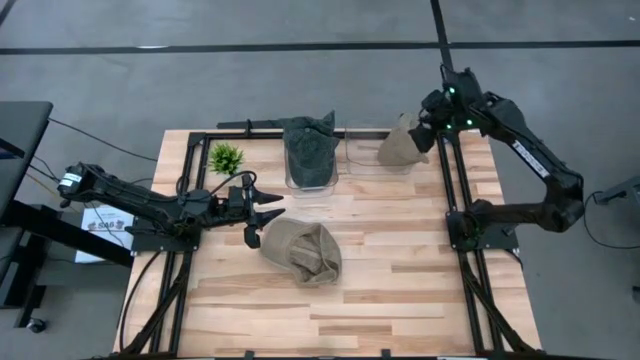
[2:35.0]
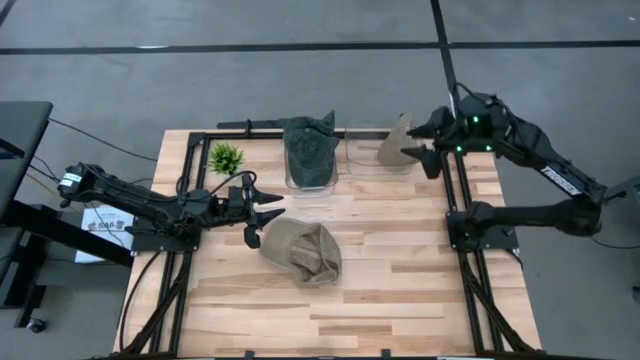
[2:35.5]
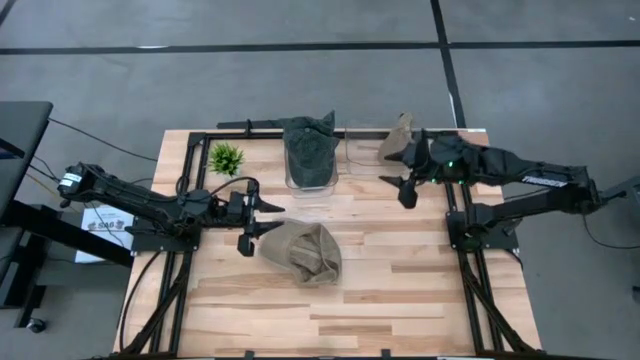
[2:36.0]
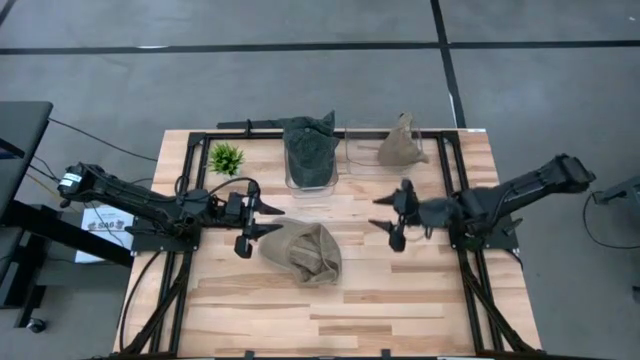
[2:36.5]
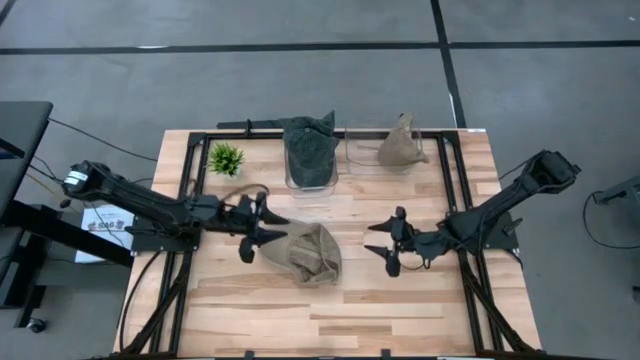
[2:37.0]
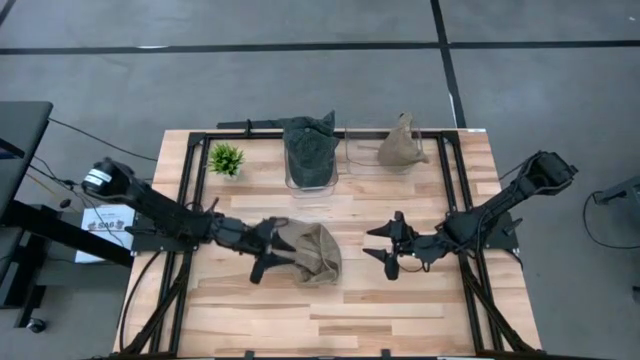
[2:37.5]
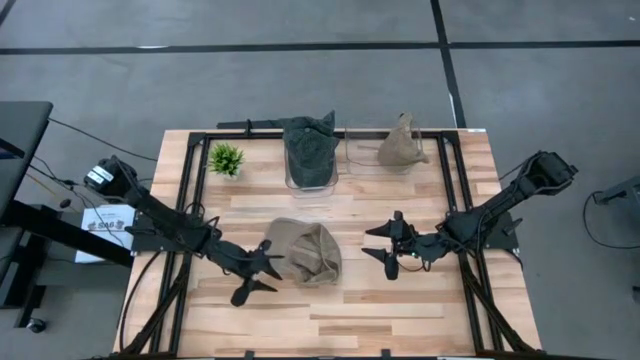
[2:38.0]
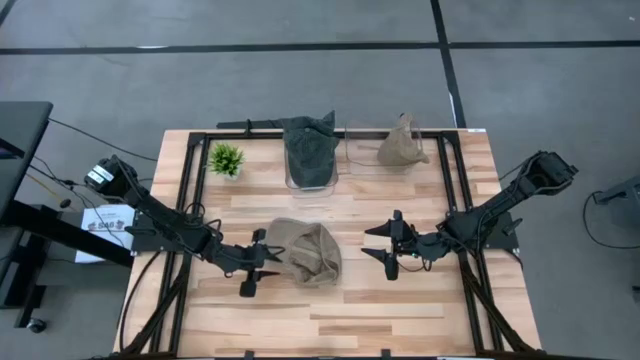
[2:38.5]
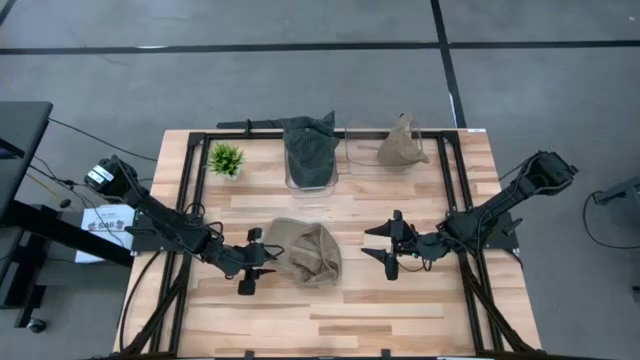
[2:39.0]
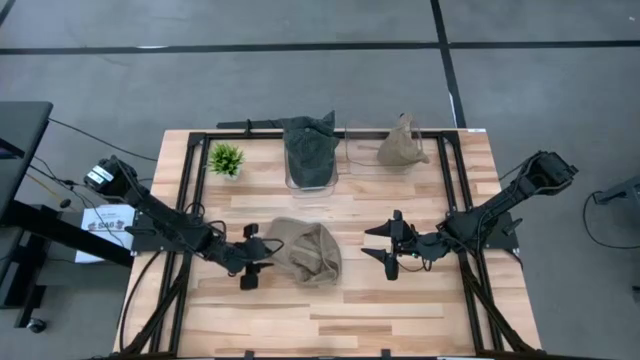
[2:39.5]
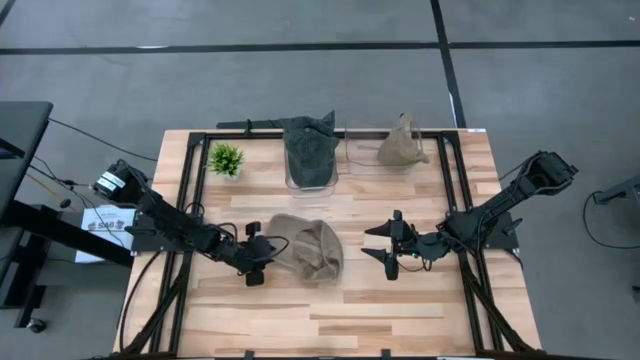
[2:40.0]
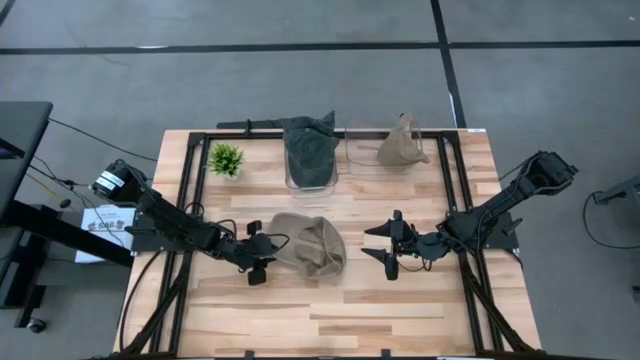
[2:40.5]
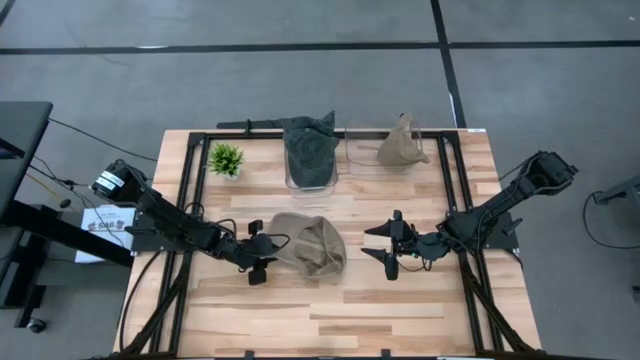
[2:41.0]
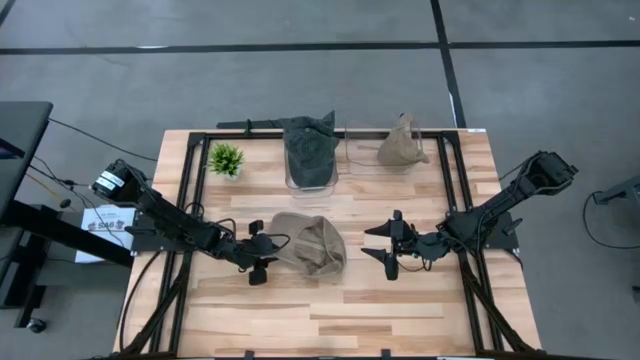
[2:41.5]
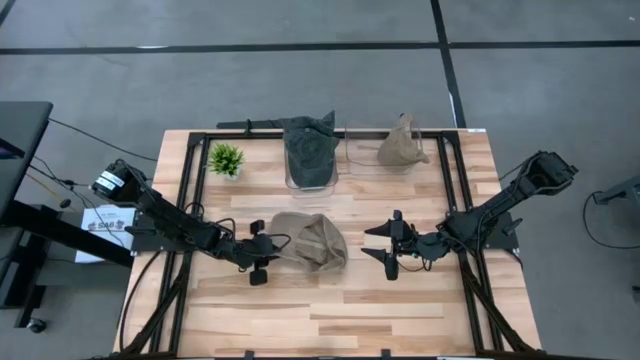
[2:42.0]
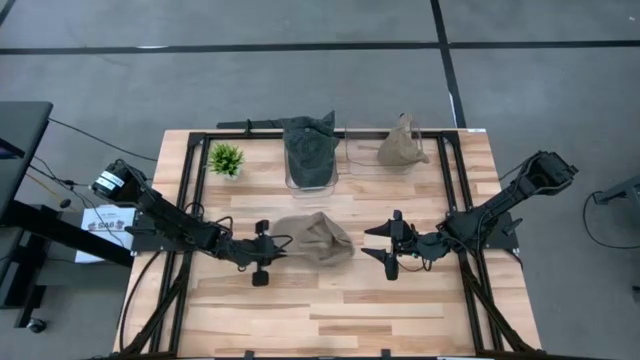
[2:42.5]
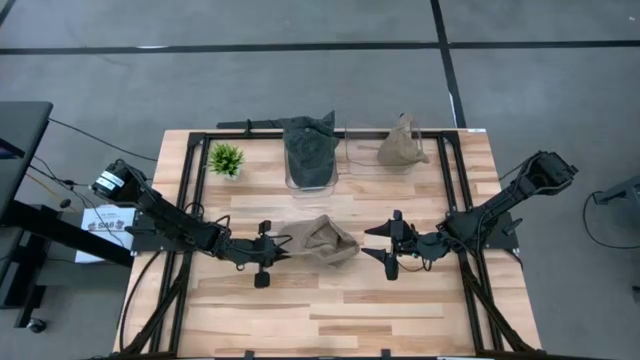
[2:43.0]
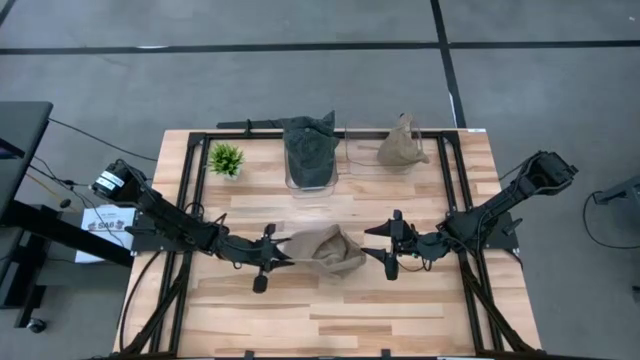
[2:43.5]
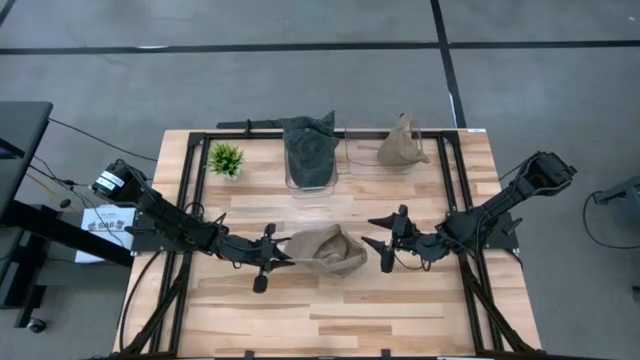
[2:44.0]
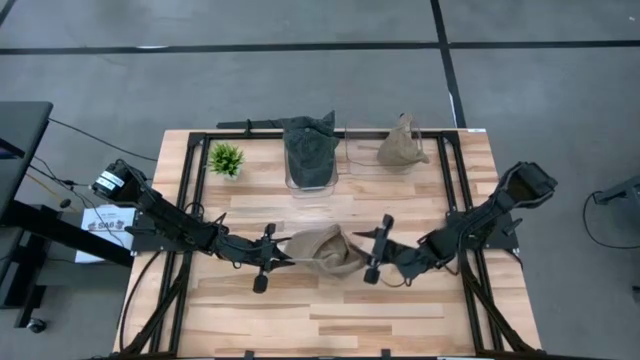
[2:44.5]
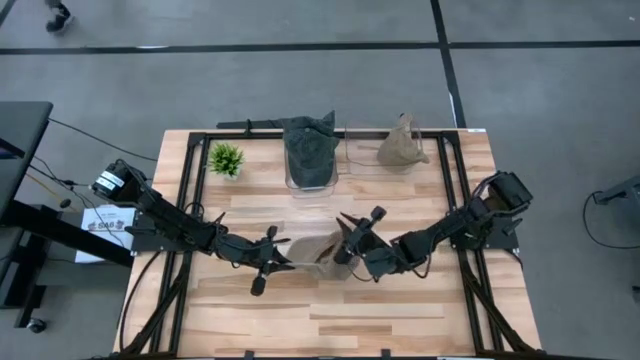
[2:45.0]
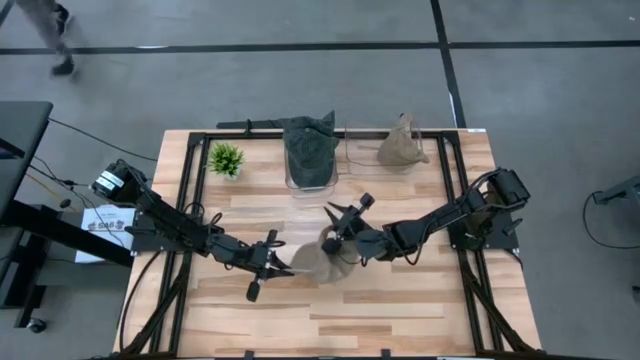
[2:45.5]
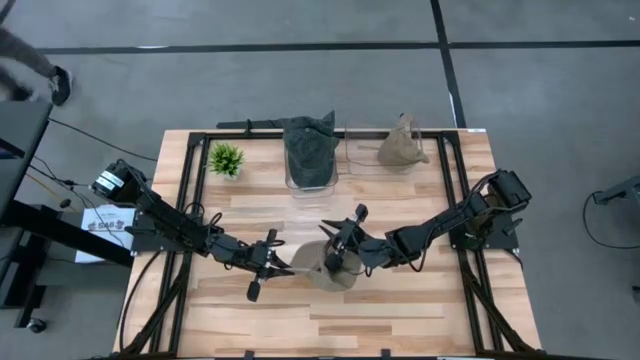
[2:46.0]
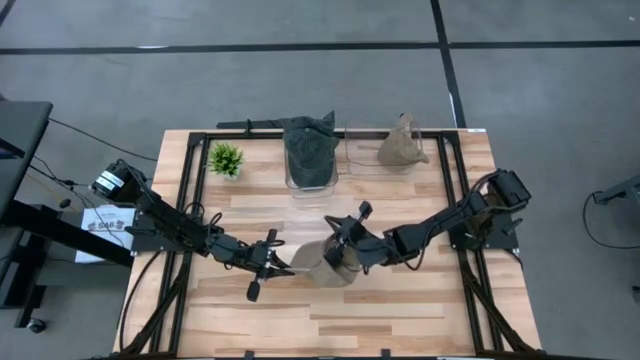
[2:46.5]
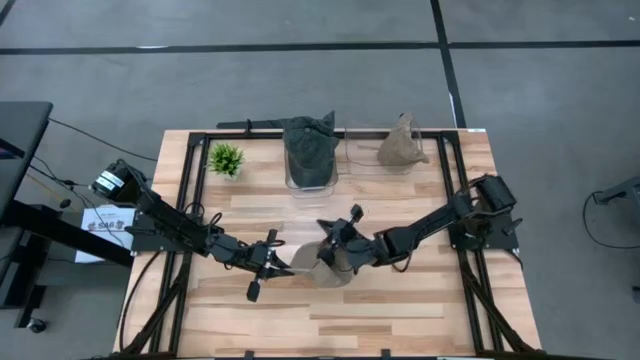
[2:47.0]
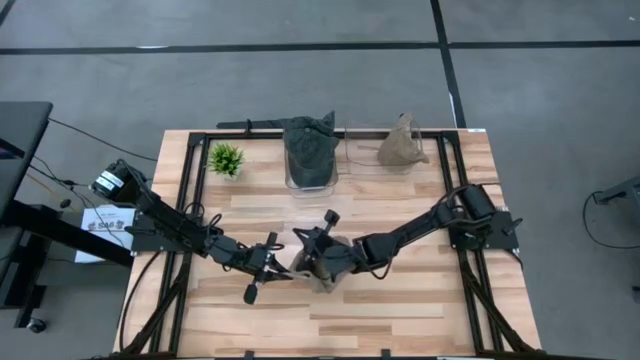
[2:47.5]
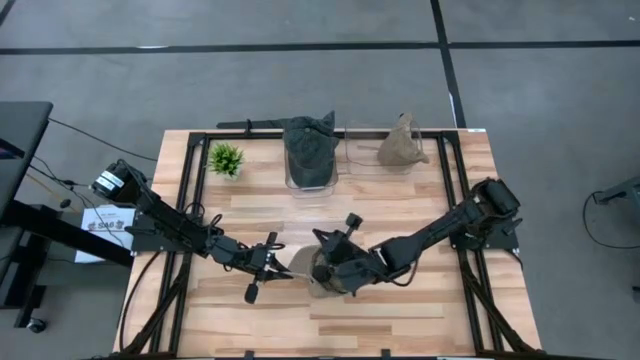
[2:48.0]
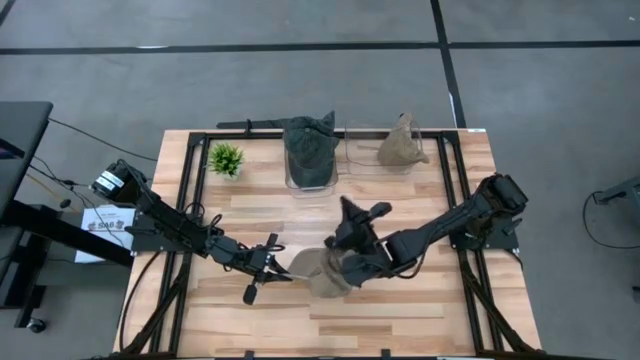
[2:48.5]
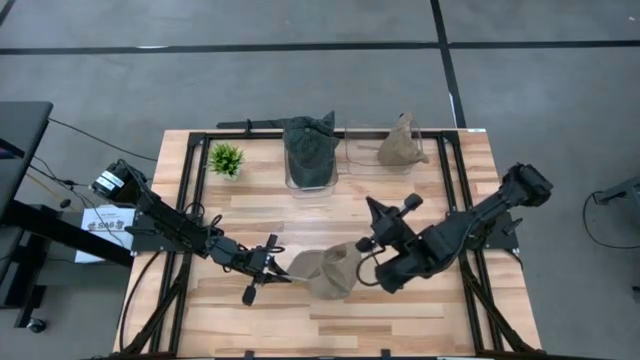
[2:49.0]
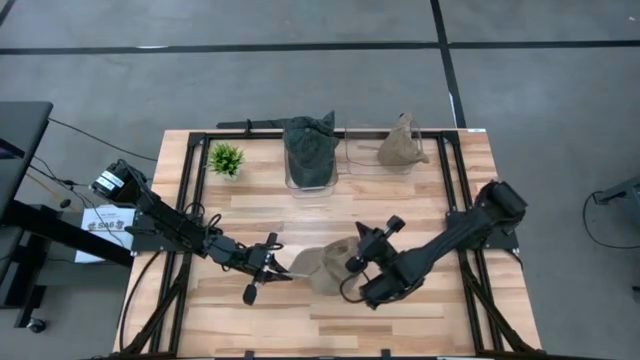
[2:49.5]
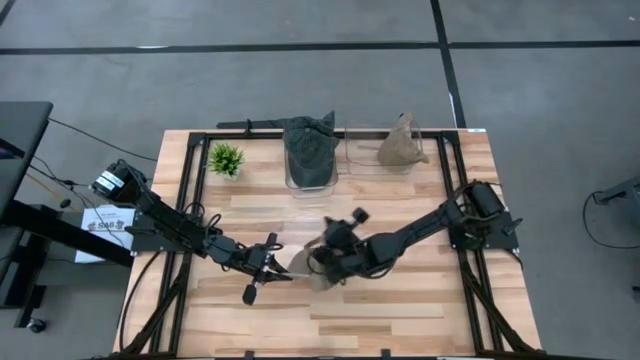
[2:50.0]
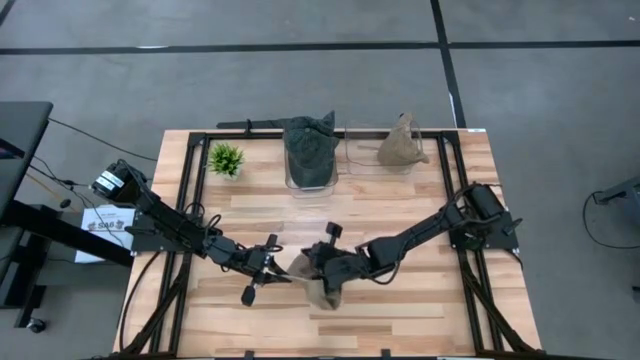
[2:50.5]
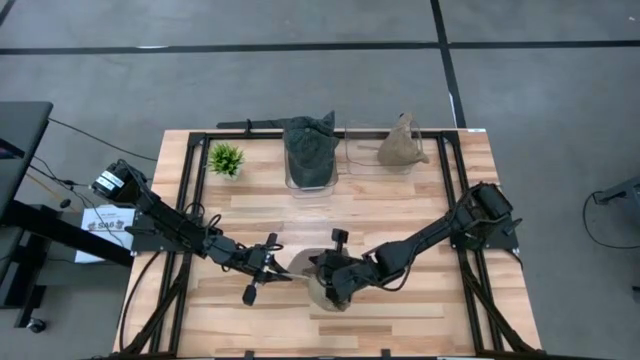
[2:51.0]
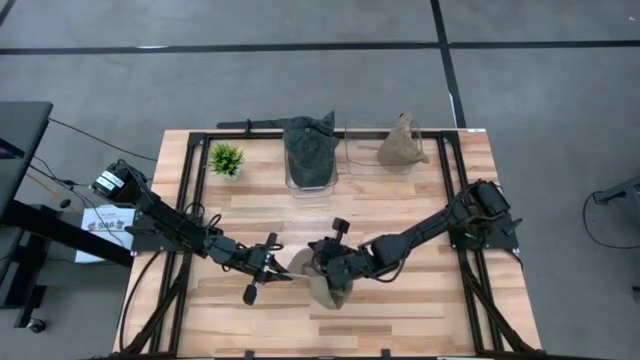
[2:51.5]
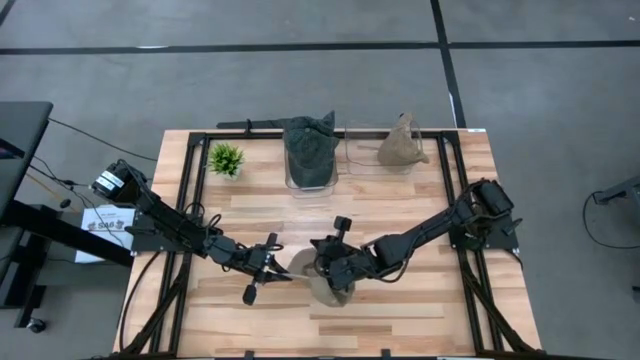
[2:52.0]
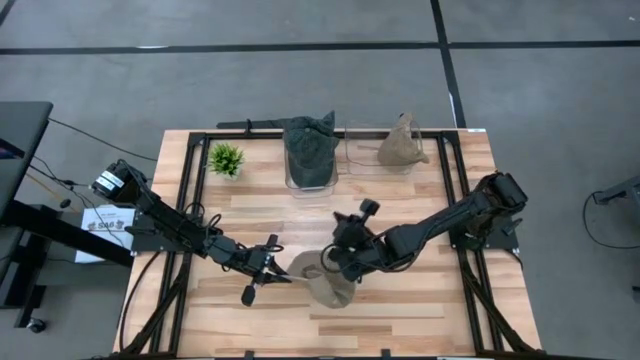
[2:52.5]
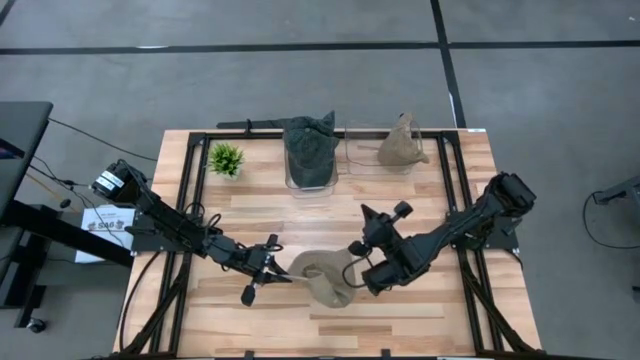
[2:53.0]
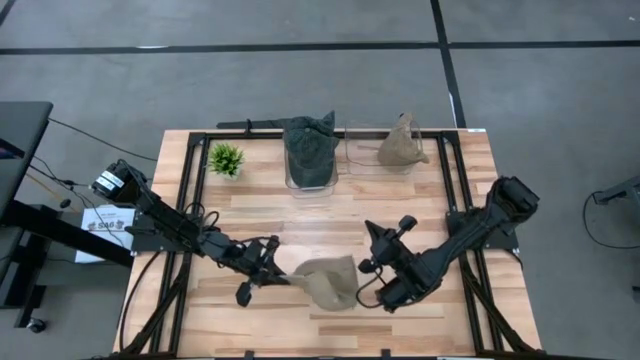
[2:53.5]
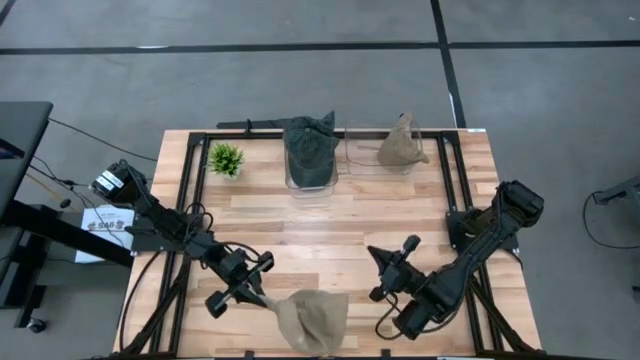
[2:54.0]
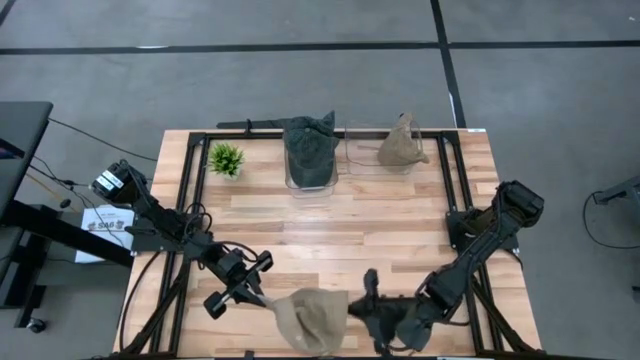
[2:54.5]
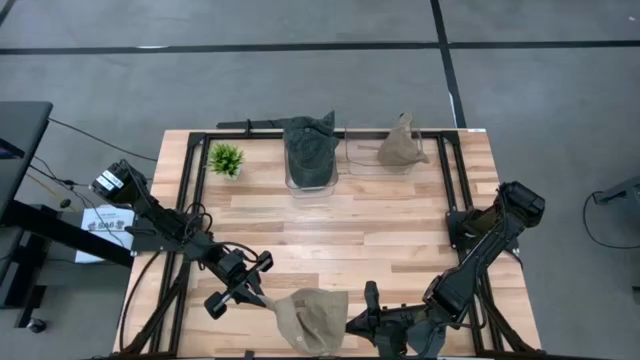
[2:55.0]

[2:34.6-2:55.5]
Task: Pick & Place hat
Put the brown cap into the right transparent bin

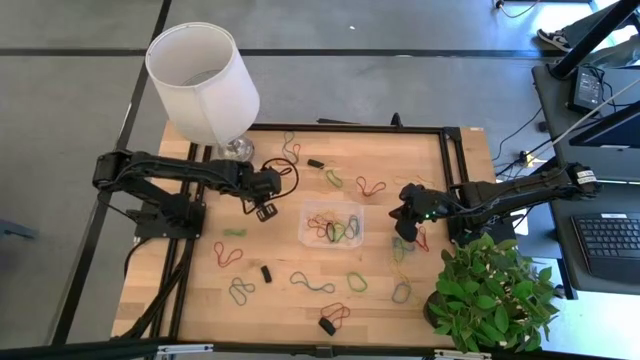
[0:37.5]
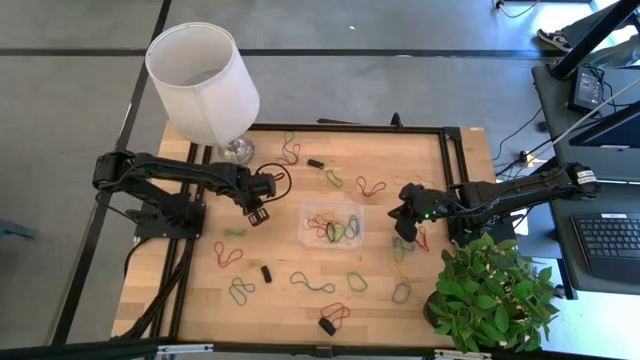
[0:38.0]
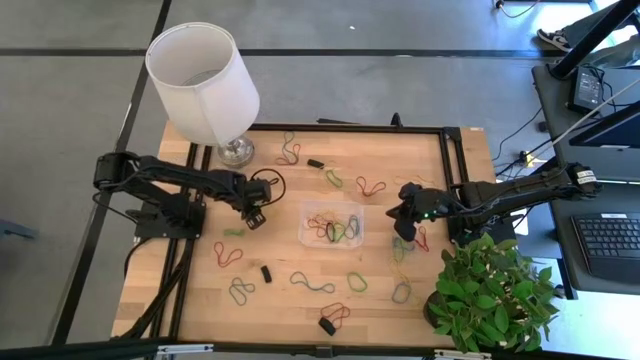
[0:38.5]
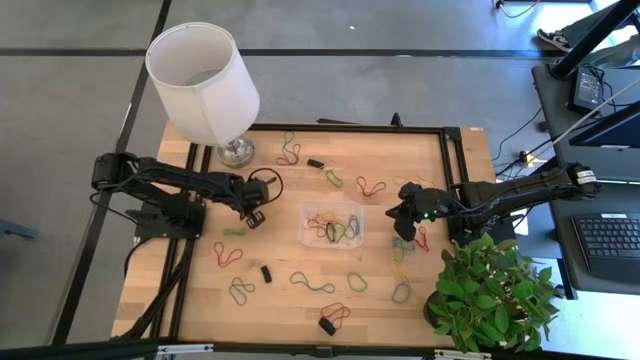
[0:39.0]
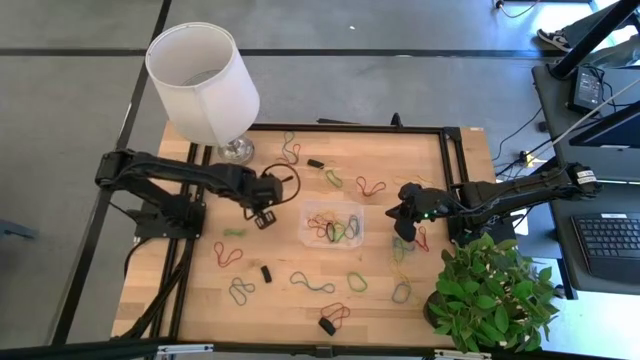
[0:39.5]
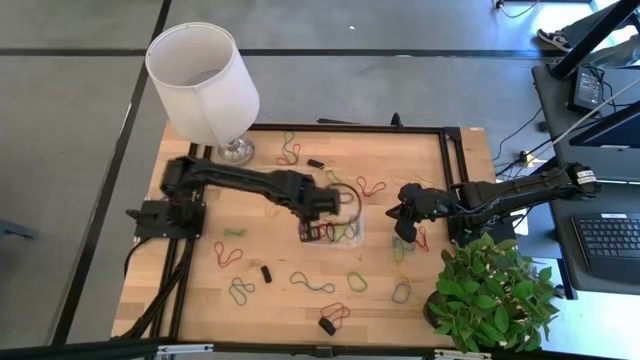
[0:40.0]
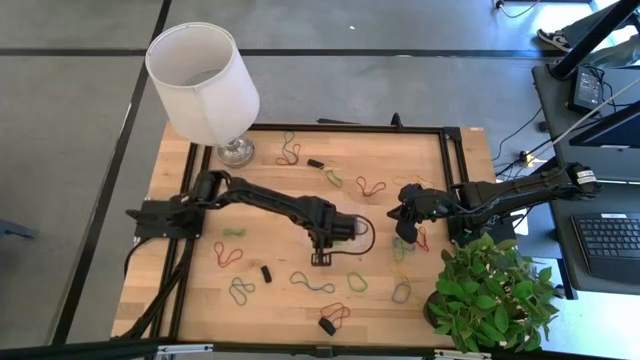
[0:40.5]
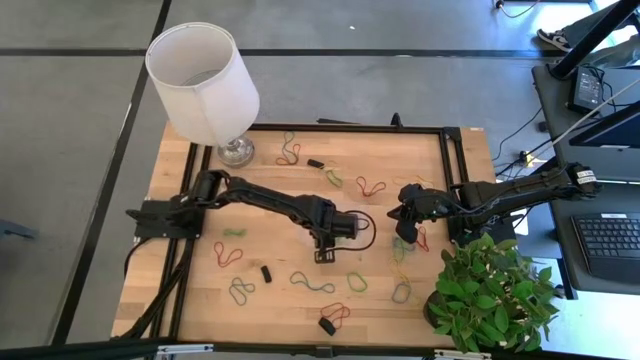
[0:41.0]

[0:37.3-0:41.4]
Task: Pick and place rubber bands into bin
Put the green rubber band into the transparent bin
